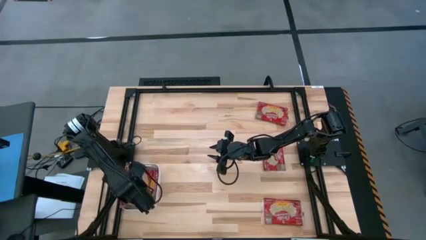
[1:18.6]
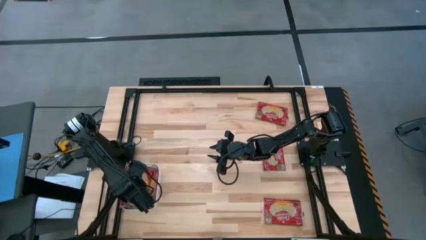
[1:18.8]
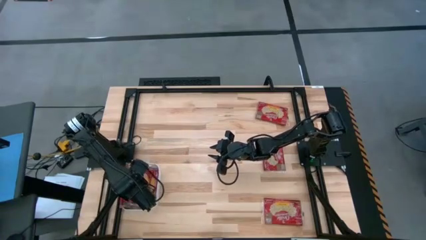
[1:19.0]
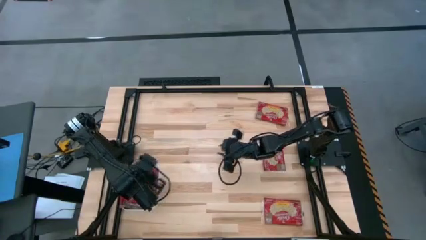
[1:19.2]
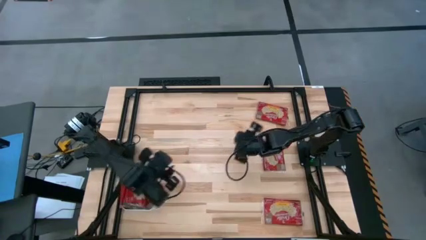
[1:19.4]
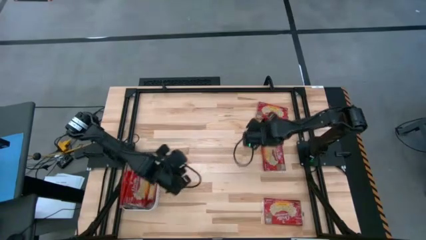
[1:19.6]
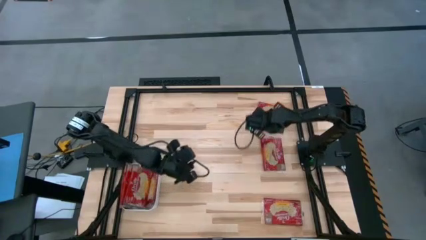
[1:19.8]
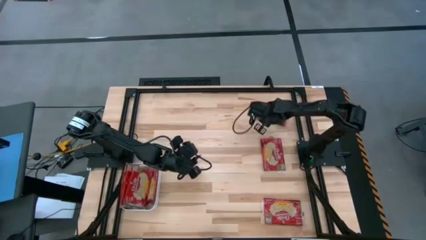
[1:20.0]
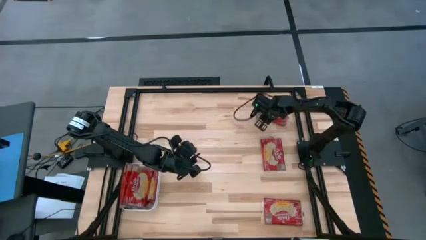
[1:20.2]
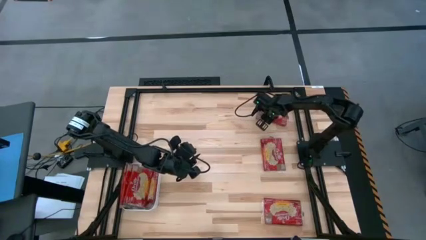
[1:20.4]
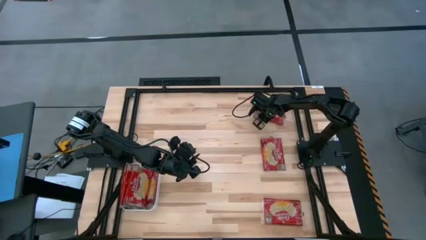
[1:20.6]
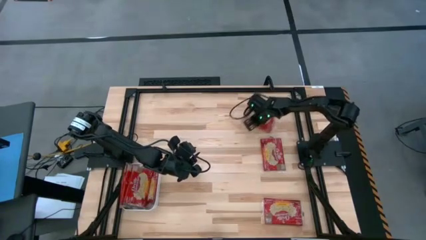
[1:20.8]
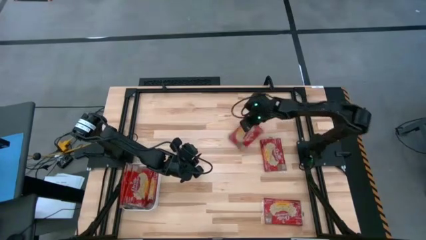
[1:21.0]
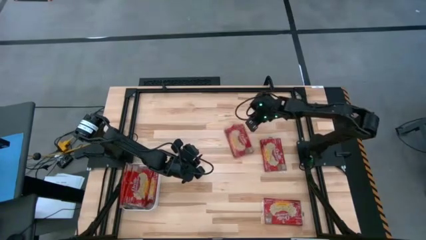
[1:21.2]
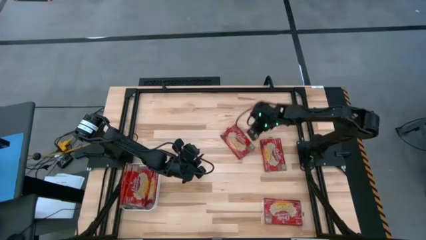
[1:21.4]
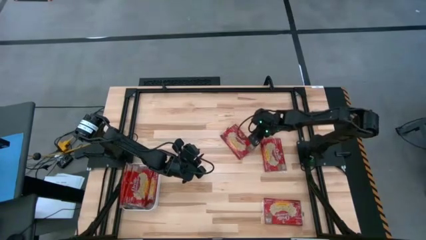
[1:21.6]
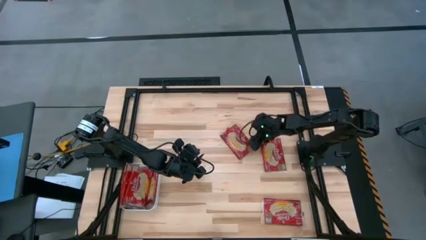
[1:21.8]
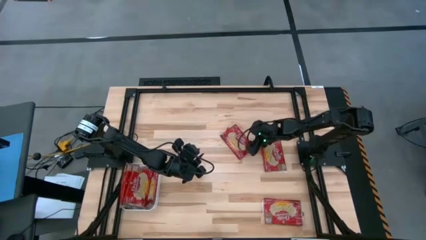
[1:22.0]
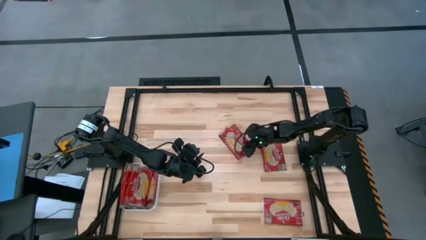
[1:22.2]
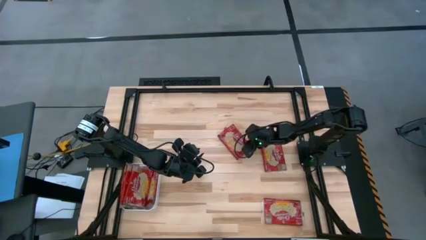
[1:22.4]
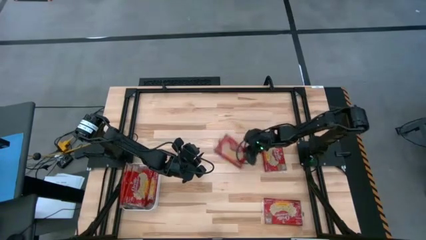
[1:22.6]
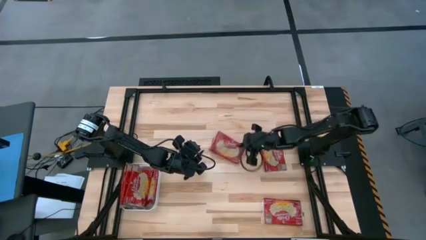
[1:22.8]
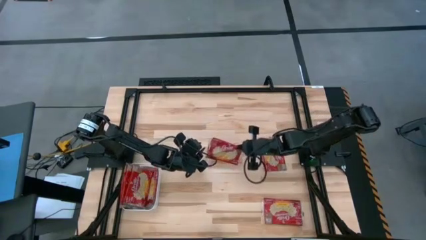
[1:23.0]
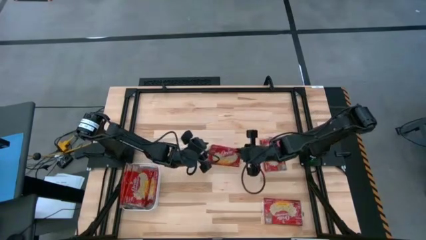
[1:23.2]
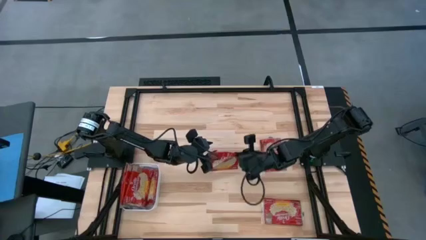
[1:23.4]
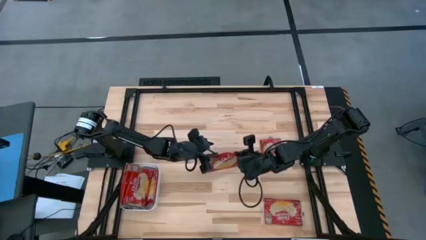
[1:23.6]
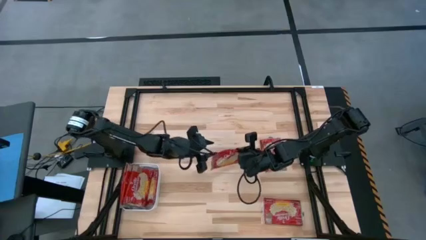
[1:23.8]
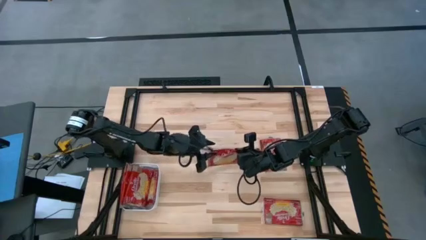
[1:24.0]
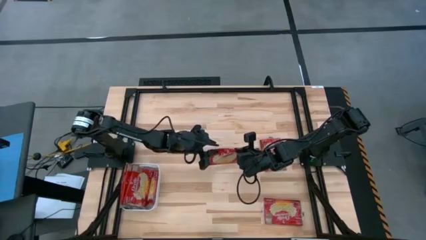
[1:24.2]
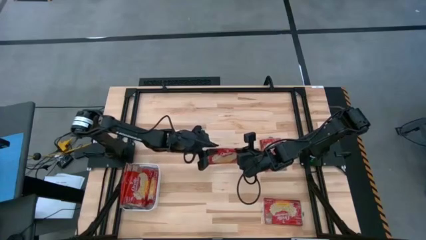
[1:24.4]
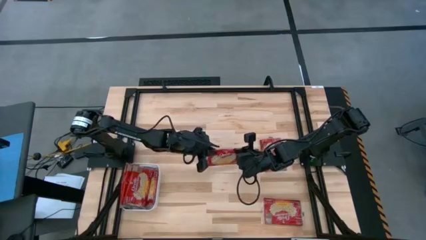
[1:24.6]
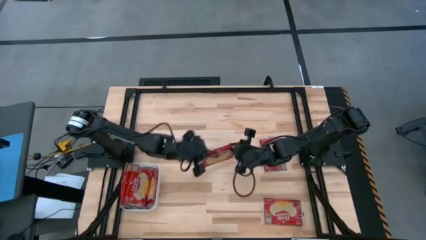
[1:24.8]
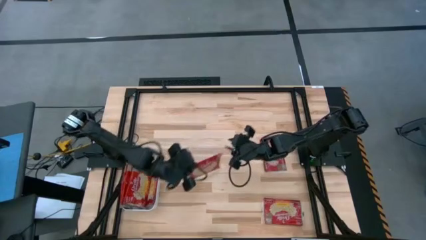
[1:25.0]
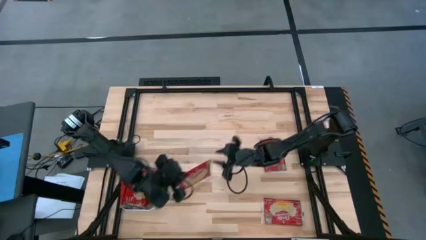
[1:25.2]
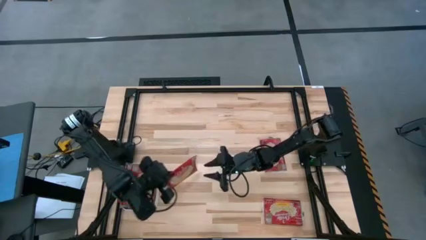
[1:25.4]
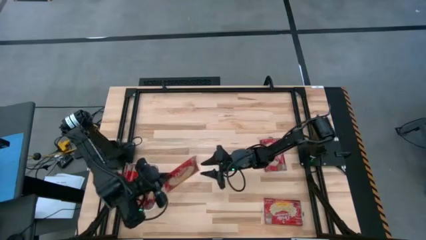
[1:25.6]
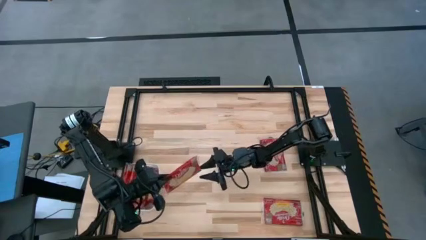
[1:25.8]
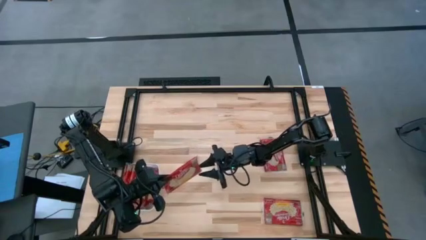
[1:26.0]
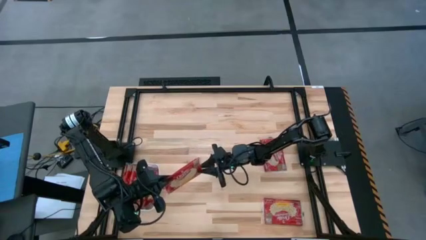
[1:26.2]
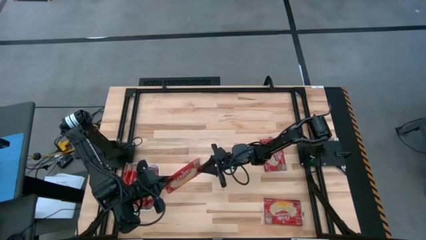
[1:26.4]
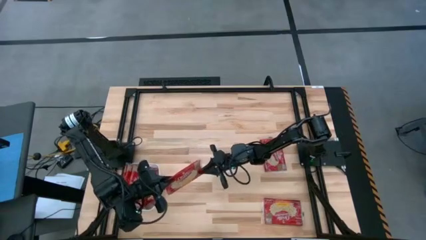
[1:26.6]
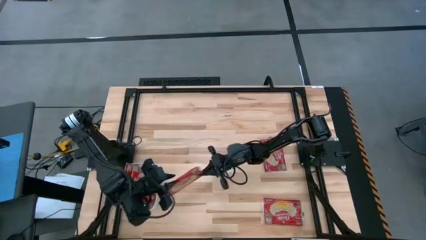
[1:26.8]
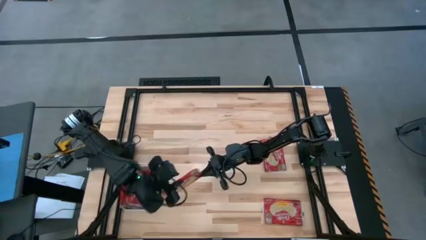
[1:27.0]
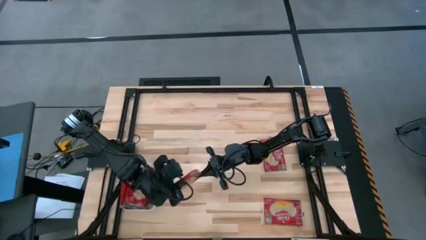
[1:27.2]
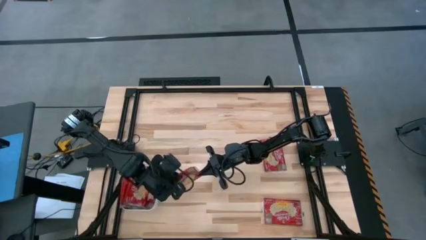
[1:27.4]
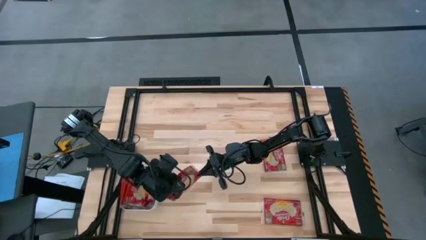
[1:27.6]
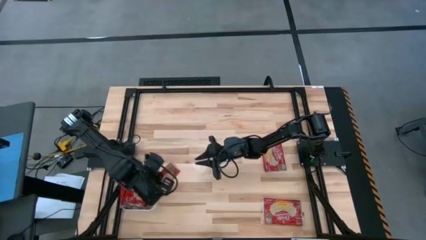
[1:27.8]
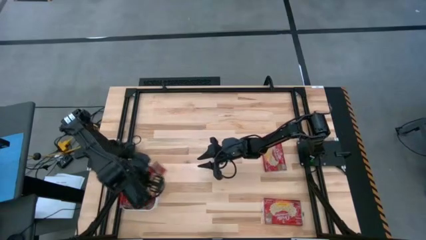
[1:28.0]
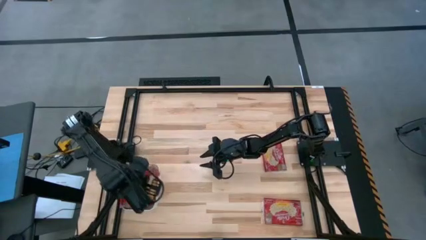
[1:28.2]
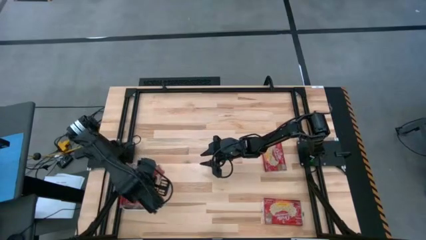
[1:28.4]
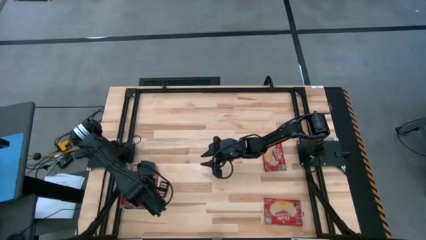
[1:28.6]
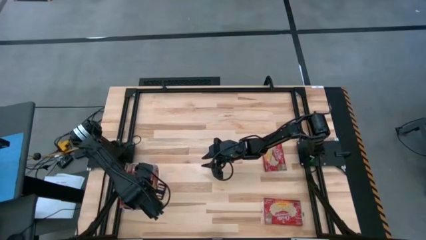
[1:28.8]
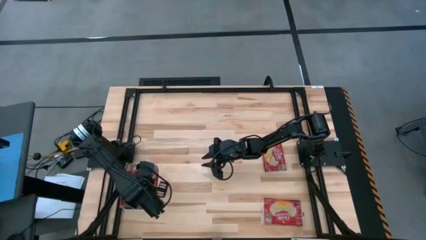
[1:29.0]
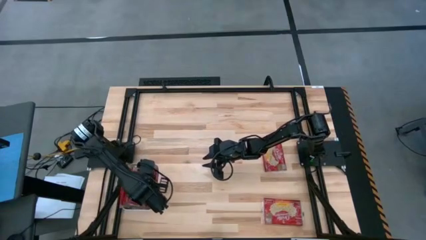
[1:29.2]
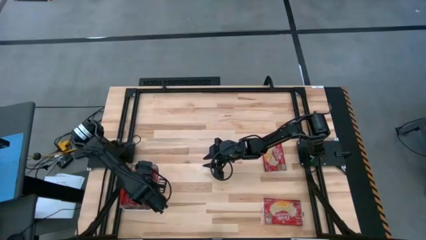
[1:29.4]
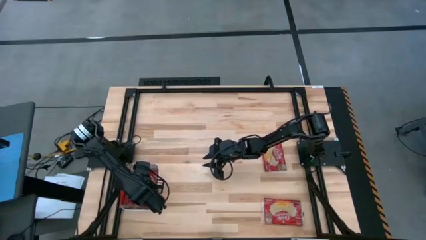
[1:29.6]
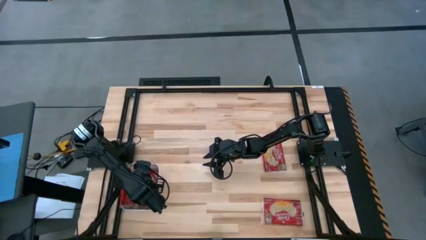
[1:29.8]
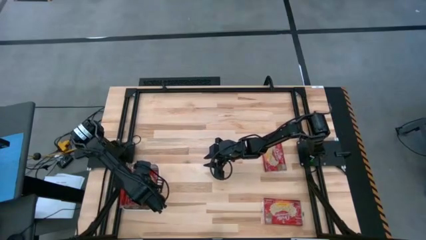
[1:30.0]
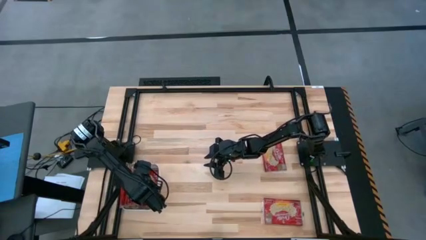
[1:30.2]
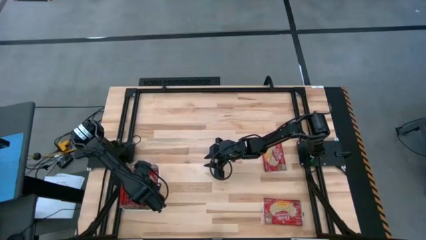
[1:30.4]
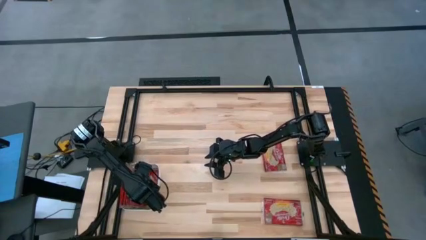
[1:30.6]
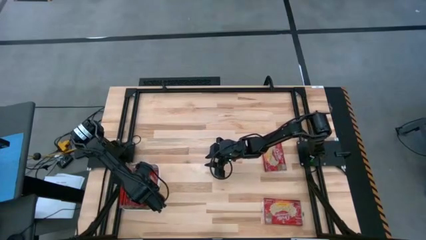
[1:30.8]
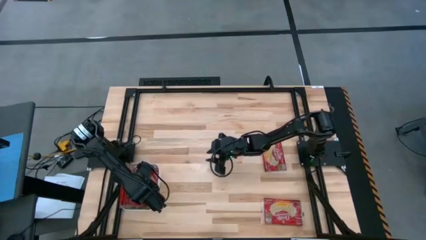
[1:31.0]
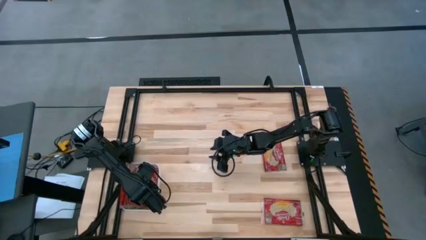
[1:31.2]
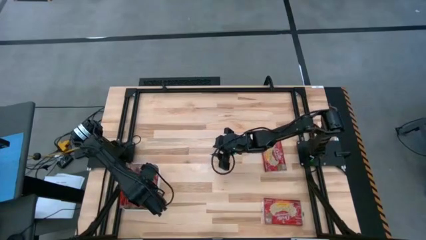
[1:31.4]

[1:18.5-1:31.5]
Task: Sort popcorn bags into baskets
Put the red popcorn bag into the white bin

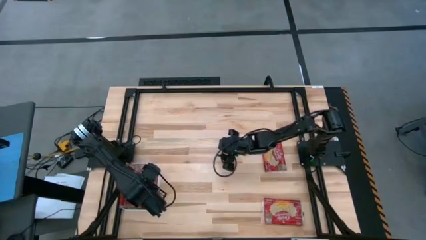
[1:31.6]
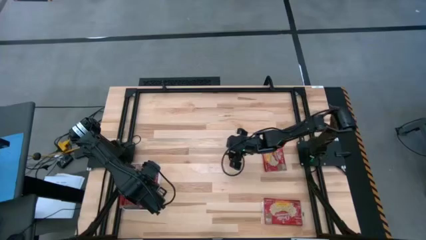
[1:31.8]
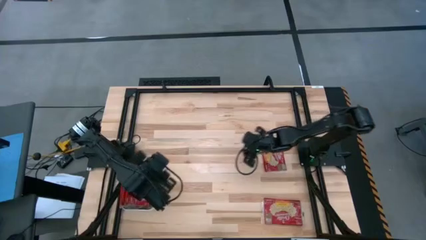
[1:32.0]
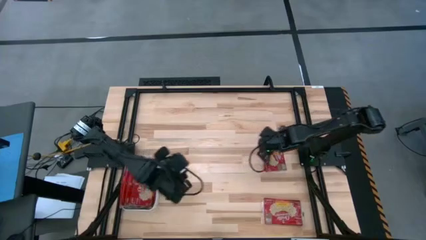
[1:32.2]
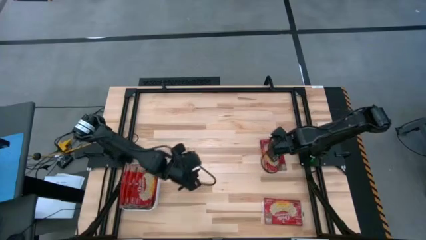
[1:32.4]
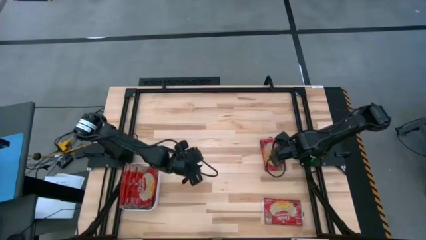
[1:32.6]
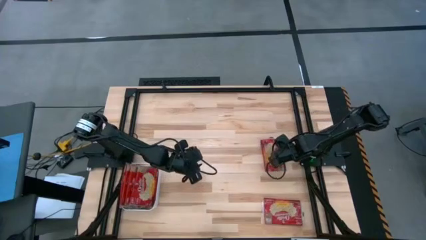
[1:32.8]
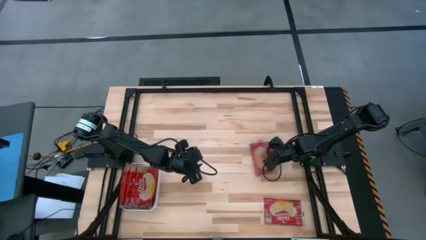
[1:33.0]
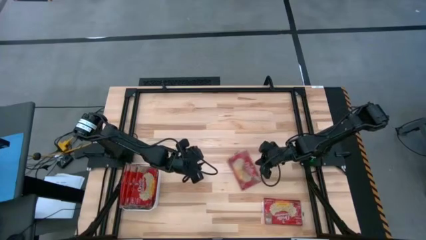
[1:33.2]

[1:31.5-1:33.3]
Put the red popcorn bag into the white bin

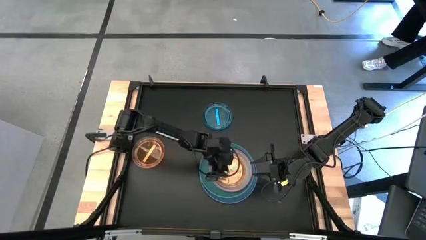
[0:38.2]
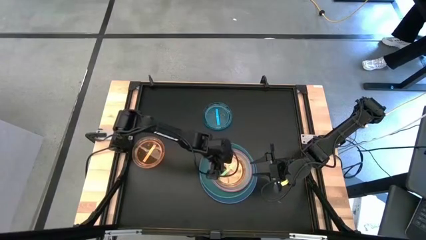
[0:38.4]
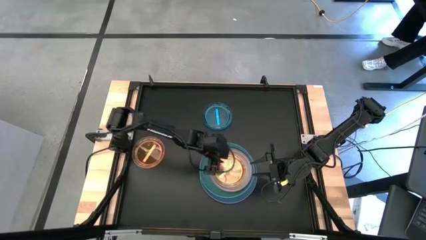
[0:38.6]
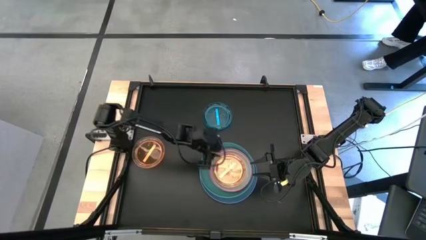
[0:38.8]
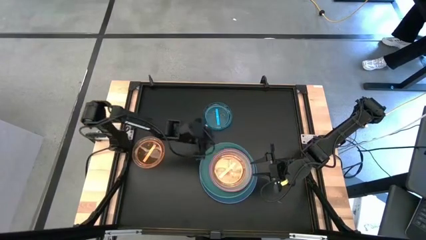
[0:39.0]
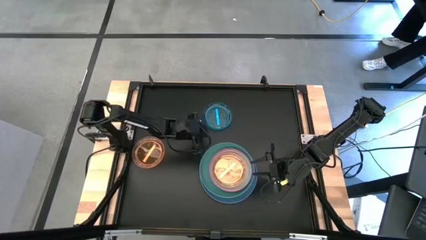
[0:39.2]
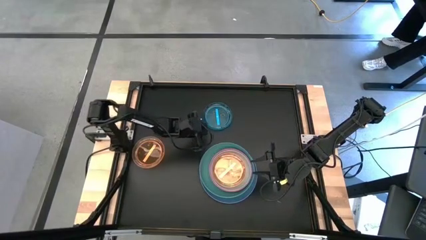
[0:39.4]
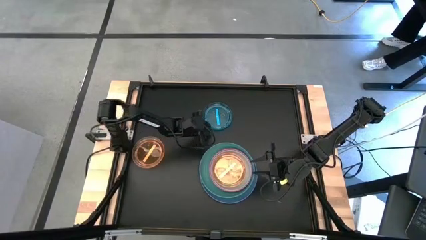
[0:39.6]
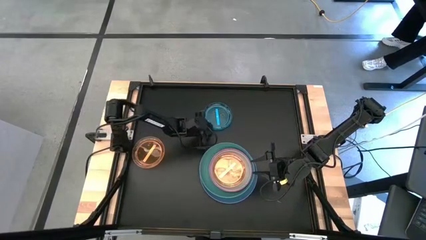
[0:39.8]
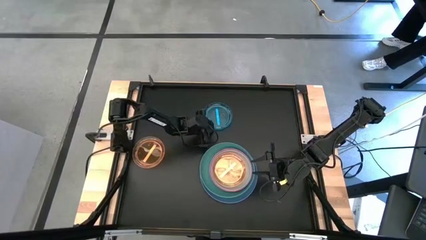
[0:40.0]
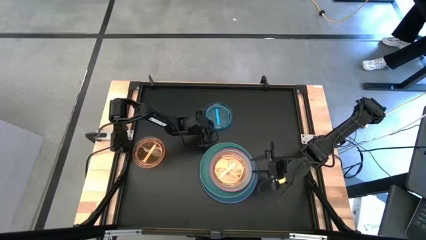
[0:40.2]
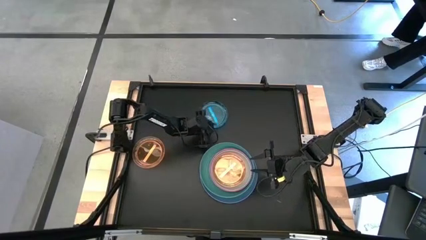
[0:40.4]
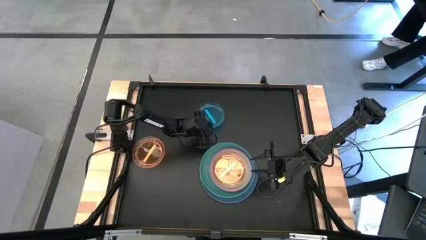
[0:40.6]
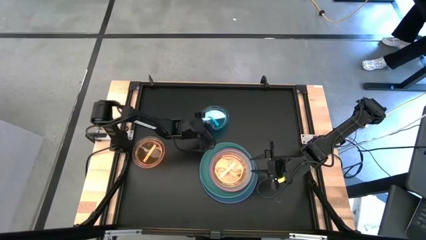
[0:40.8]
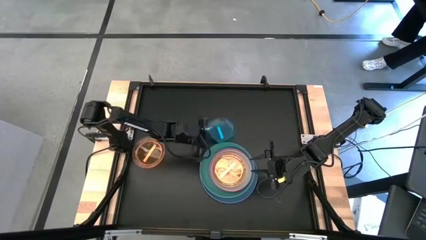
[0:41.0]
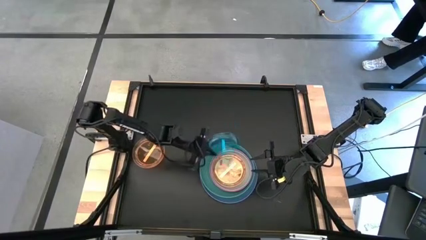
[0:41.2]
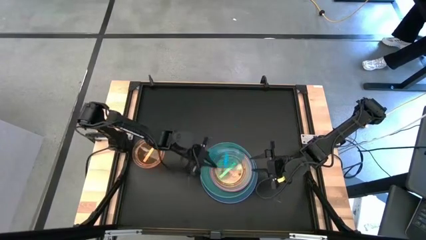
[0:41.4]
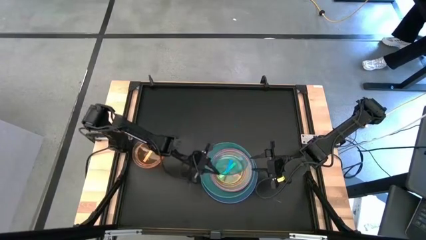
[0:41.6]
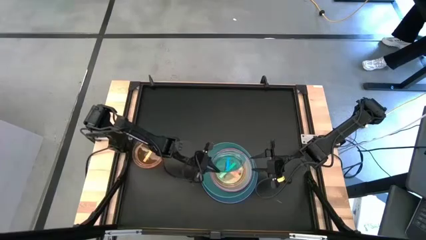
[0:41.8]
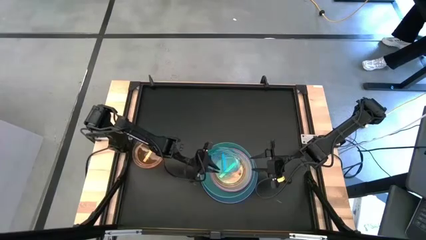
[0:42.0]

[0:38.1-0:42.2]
Task: Stack plastic plates
Stack the blue transparent plate on top of the green transparent plate
